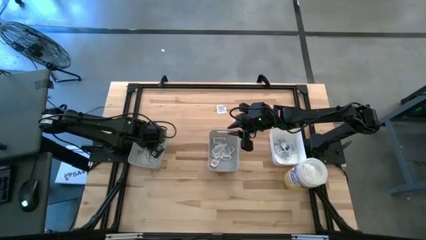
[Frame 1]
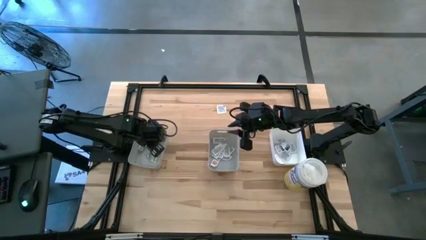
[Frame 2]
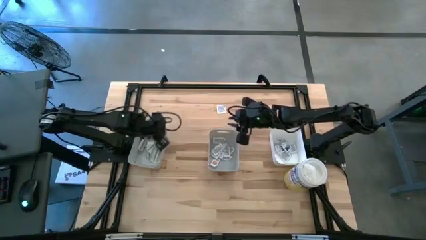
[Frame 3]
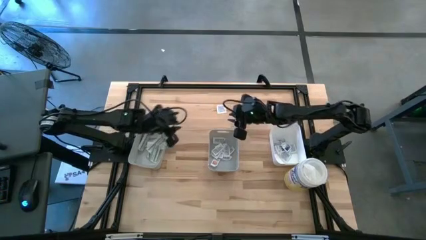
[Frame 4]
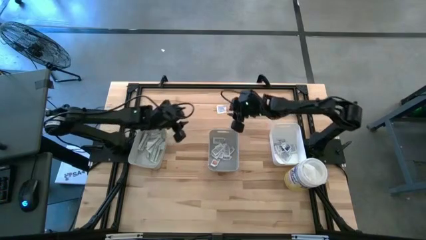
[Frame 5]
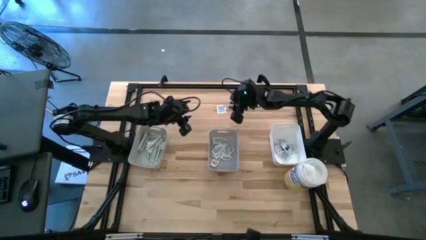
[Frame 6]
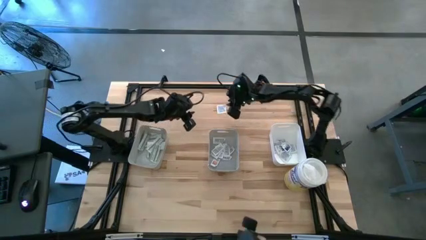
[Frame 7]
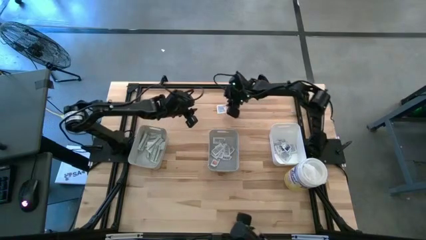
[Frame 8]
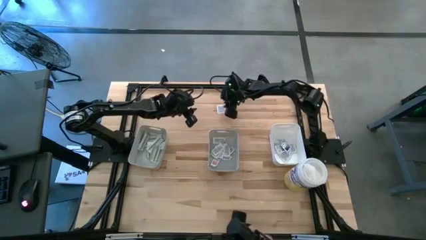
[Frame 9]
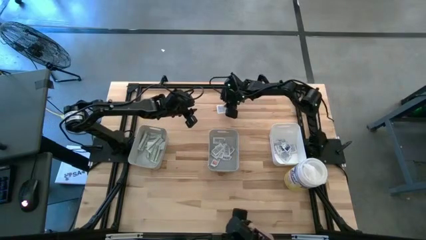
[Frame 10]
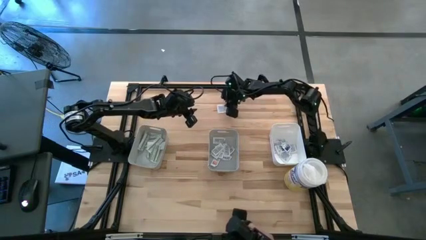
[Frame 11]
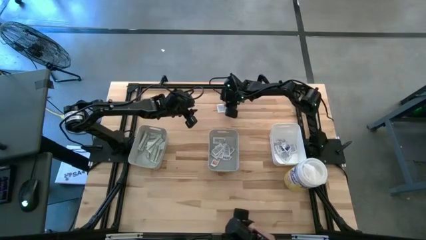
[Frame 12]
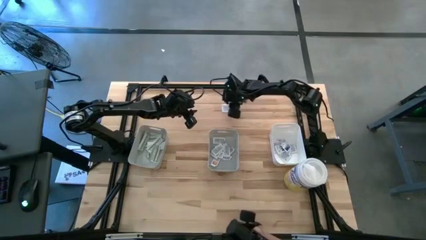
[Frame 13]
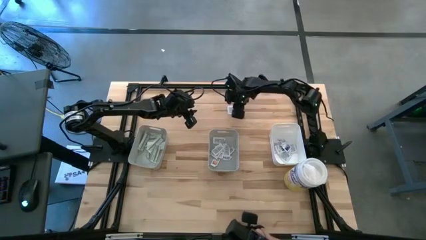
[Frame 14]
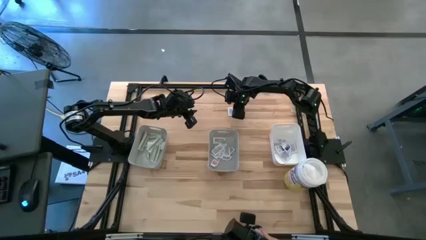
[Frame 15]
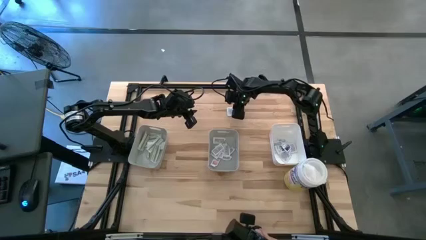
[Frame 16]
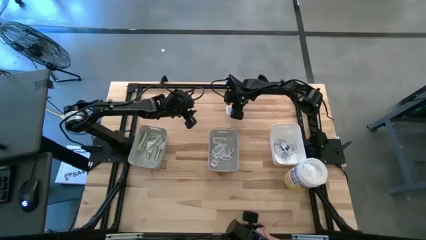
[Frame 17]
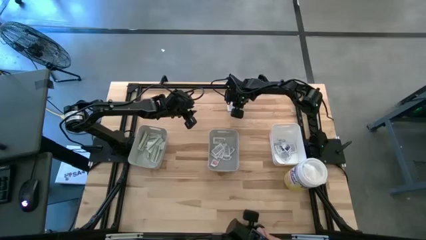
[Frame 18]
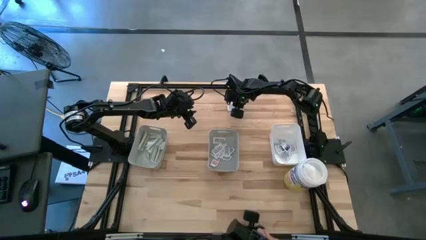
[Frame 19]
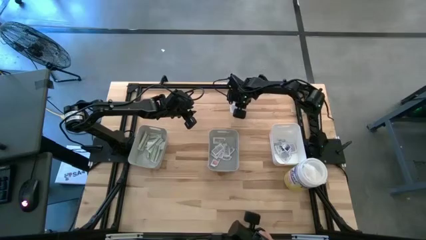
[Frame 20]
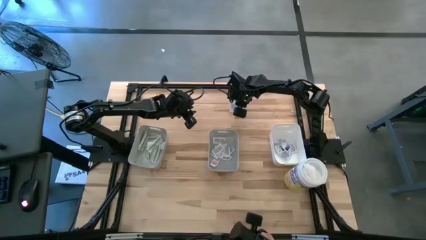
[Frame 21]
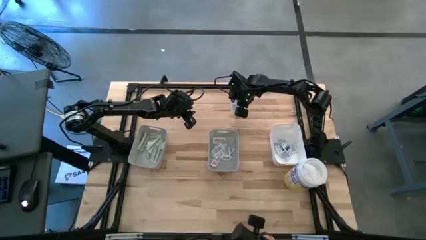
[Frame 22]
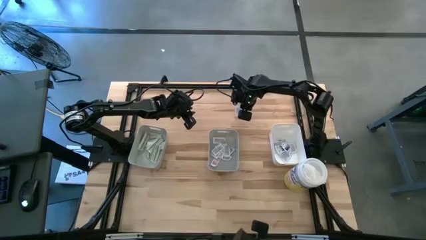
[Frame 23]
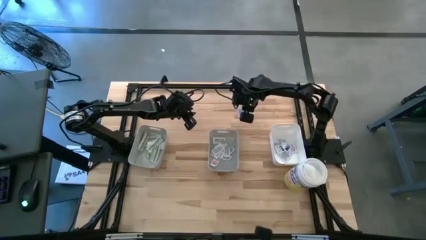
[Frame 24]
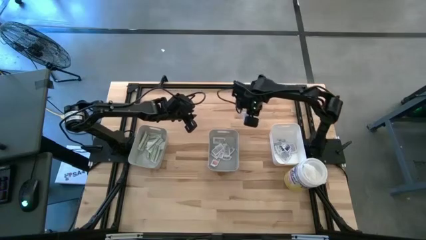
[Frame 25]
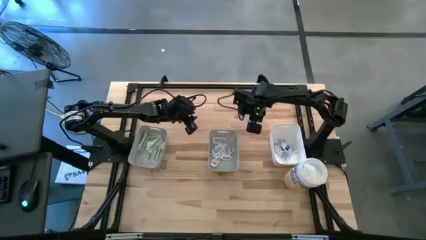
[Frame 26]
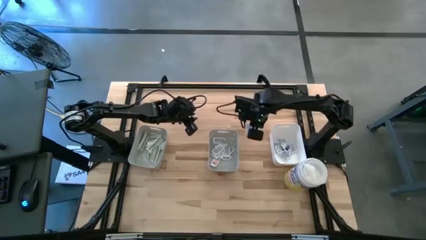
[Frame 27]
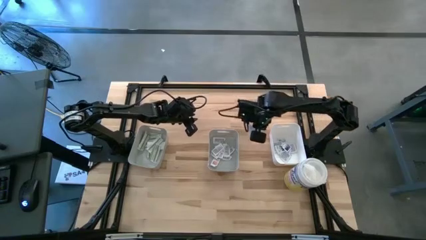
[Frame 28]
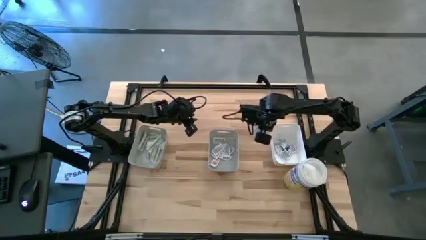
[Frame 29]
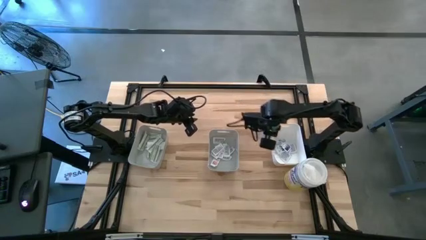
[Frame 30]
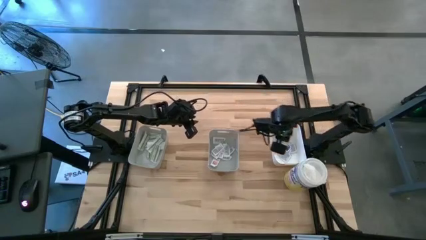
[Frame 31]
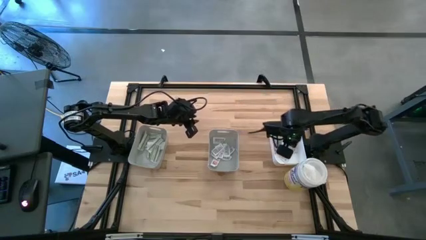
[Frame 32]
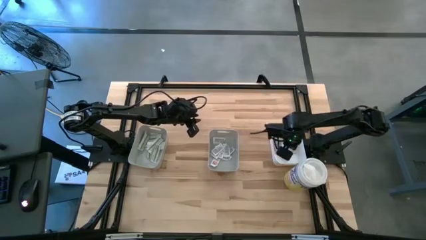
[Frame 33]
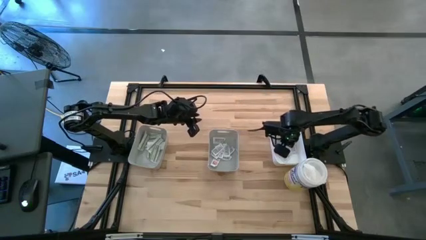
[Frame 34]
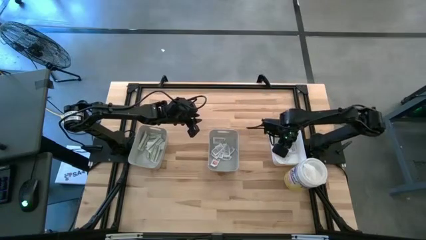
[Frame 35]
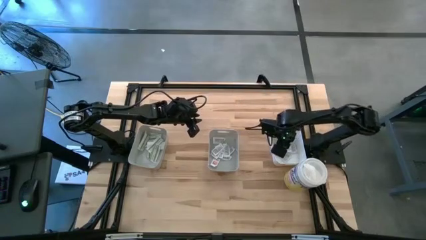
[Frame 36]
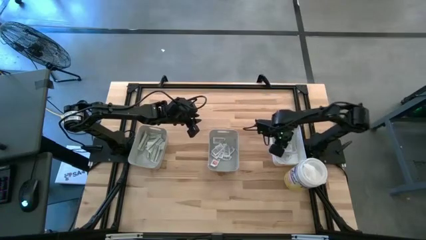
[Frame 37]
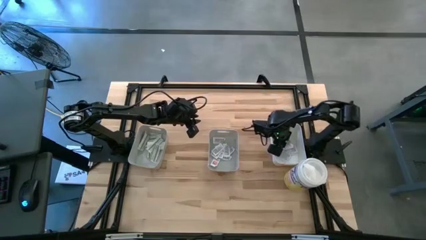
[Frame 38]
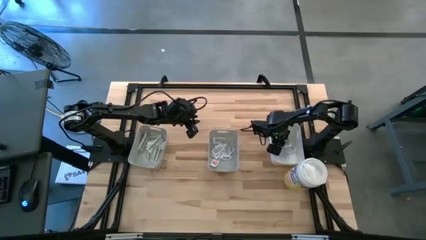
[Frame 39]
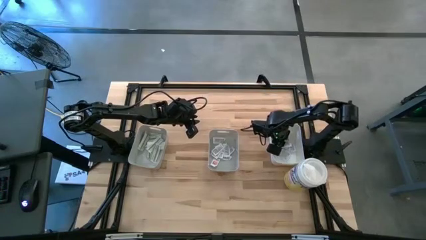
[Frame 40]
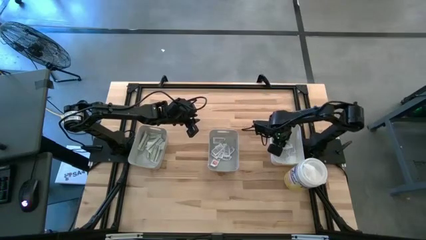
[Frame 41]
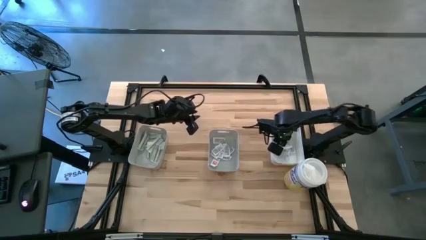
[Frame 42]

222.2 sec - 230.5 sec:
Task: Pick & Place First Aid Supplies
Put the alcohol pad into the white bin

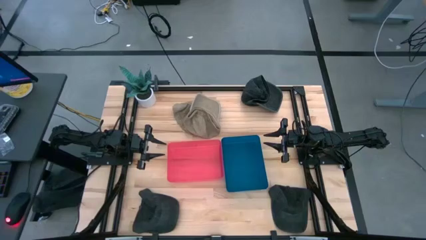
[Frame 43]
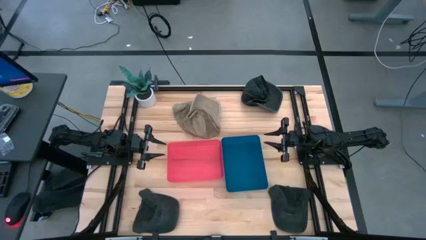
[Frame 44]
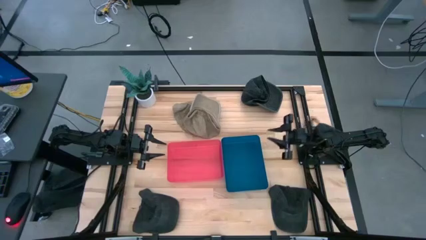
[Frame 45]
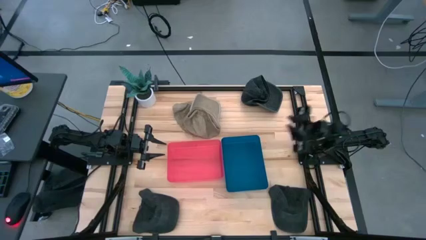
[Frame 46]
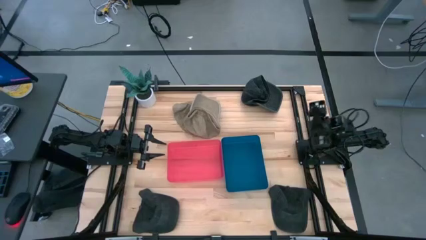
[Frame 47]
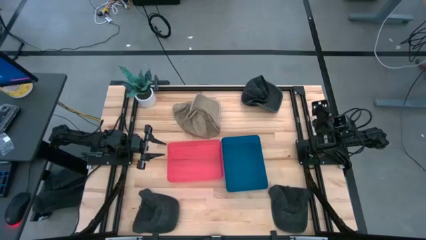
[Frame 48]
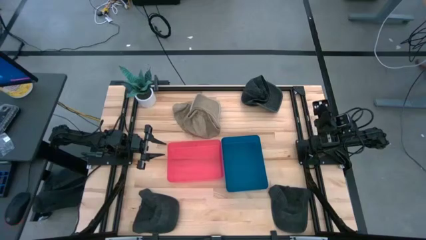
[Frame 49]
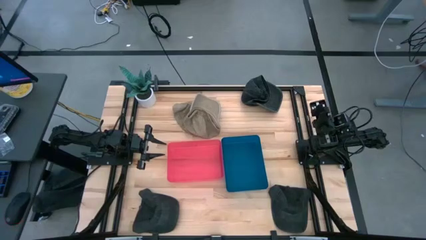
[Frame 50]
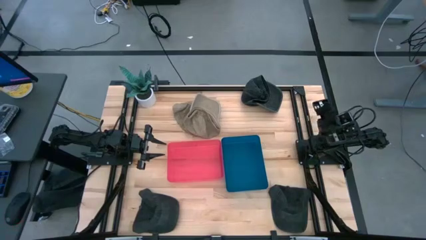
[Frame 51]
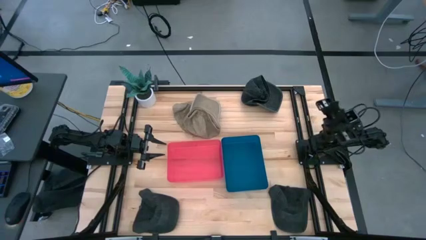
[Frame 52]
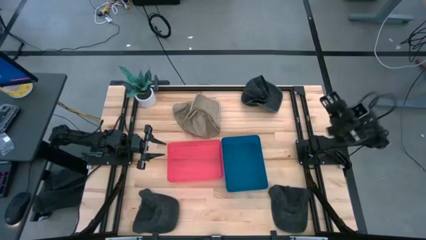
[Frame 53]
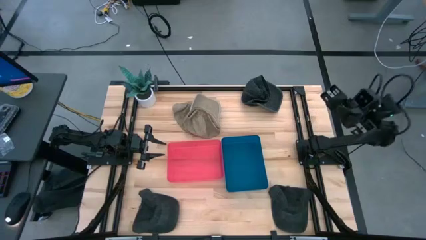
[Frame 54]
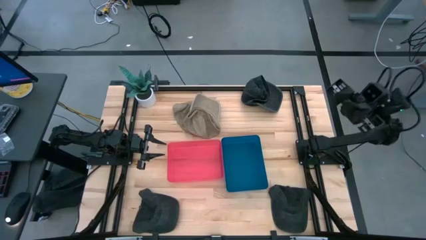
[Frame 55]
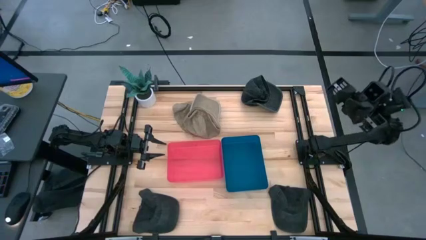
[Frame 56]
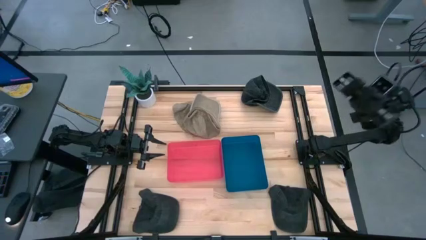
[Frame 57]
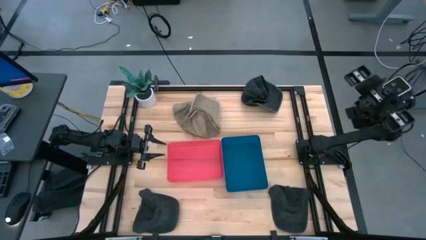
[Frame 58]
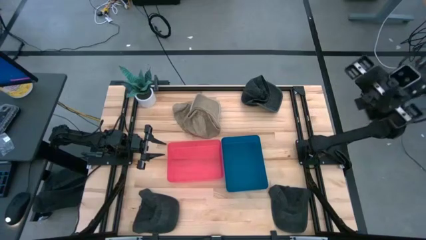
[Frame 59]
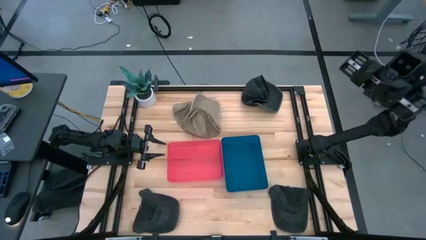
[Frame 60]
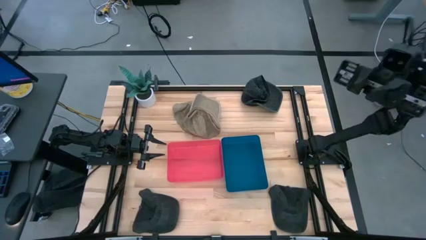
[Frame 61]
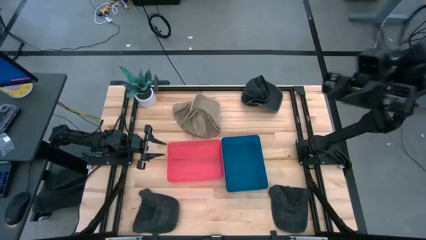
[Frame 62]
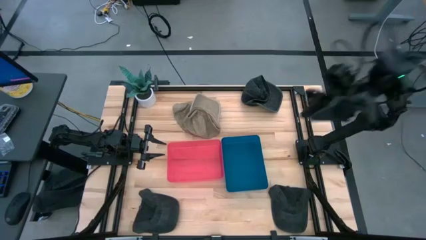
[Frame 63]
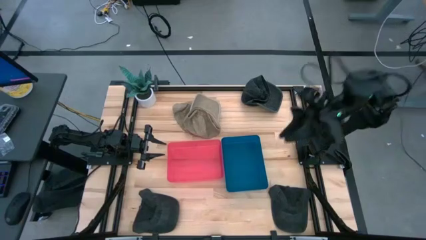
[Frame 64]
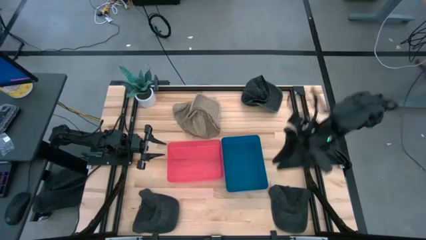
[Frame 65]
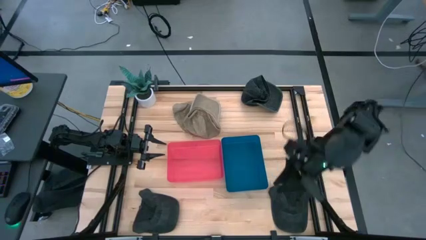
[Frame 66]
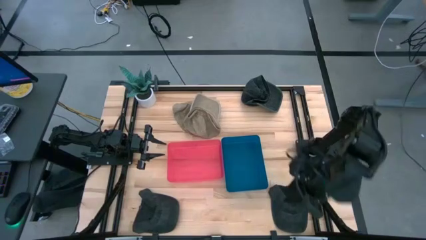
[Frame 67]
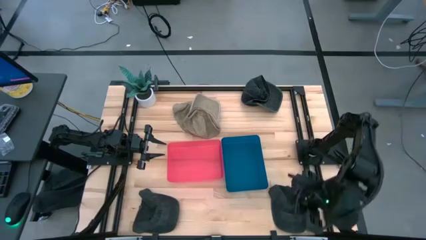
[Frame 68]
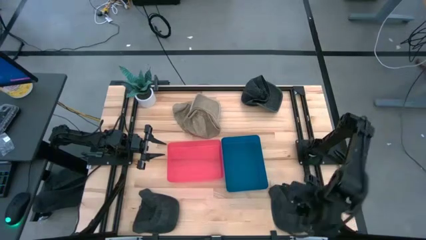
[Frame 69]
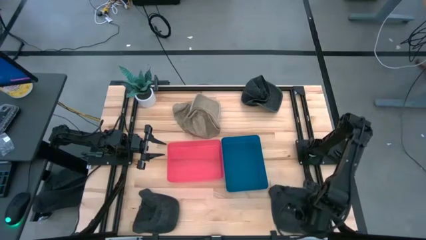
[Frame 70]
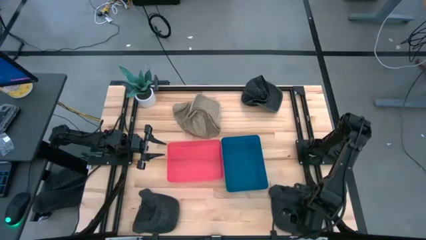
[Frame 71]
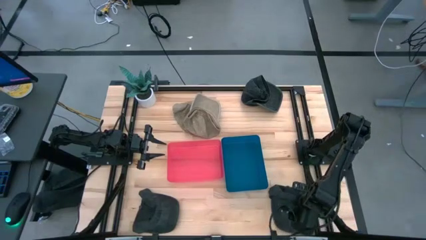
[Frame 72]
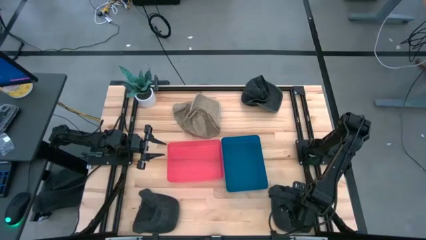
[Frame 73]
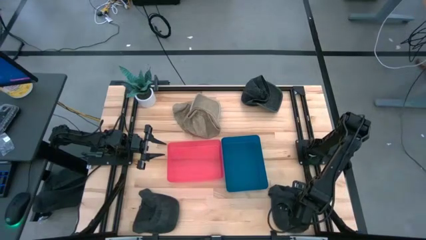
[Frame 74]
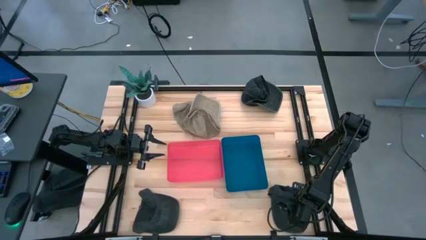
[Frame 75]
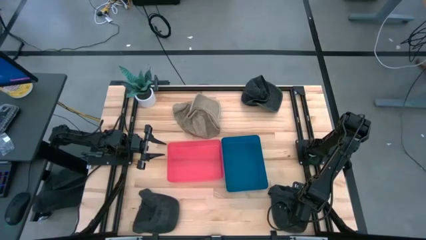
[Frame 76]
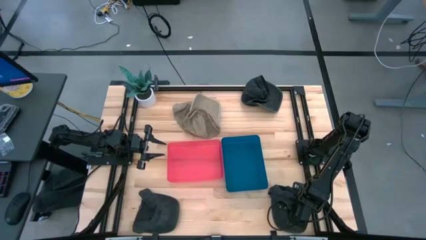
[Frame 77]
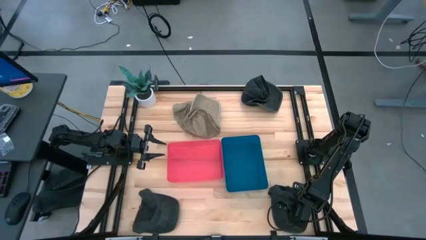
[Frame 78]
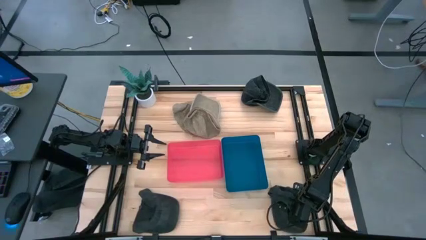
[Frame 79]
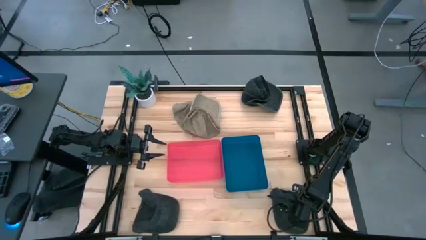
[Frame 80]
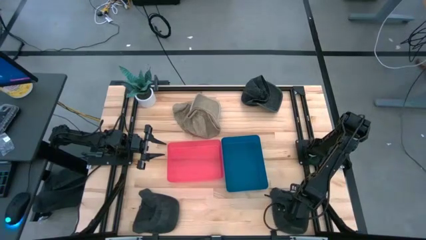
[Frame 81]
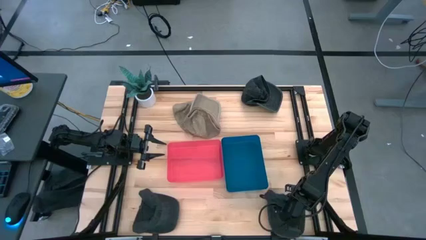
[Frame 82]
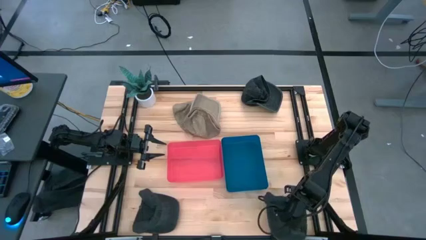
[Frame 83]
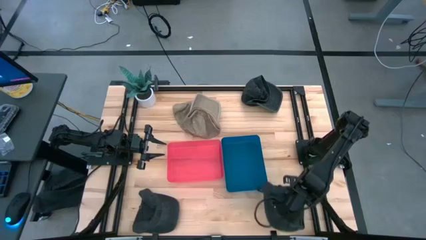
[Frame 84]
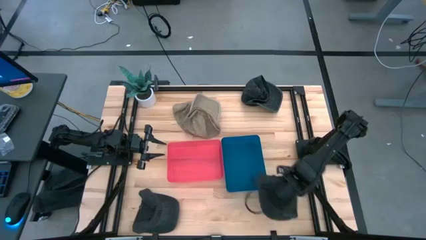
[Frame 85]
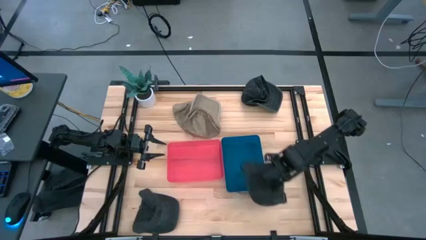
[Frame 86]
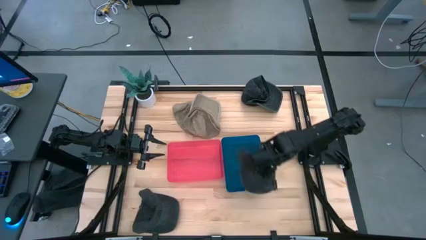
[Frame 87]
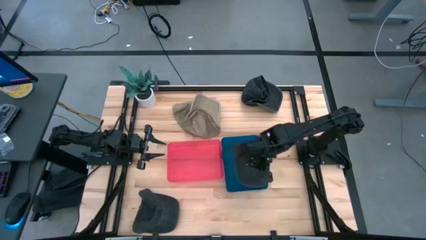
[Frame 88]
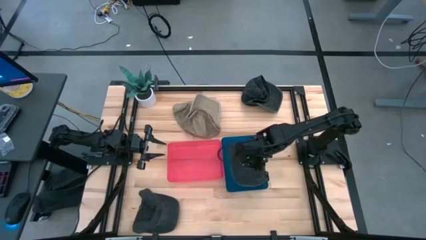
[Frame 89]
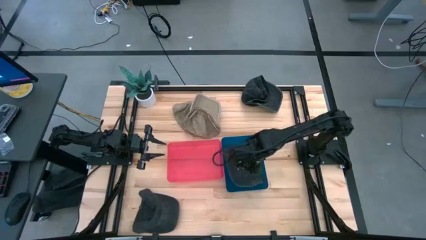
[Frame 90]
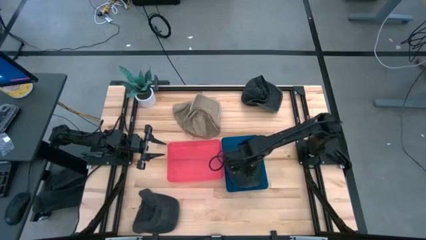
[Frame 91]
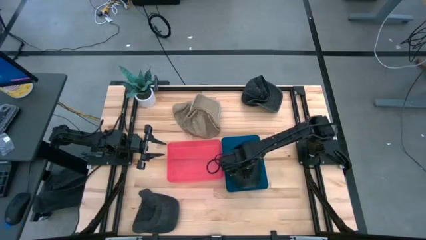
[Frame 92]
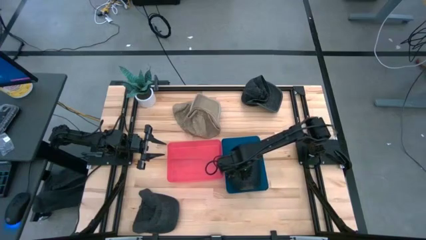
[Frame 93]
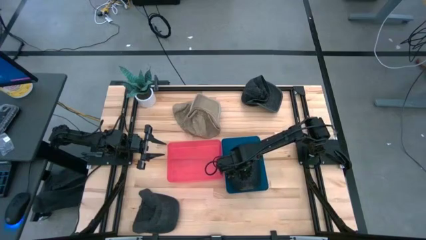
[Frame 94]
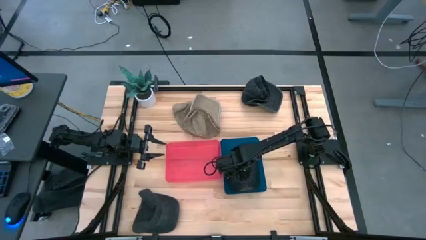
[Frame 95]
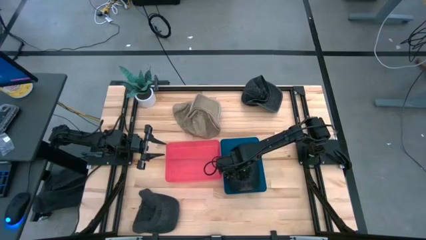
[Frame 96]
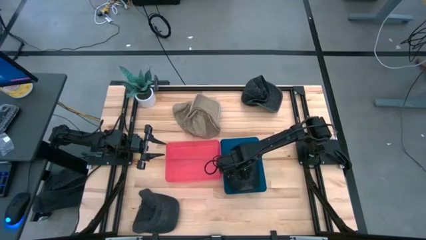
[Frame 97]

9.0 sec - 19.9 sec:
Task: Pick & Place hat
Put the bottom right black cap into the blue bin
